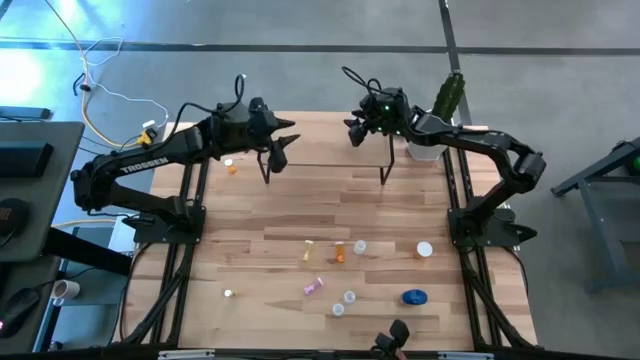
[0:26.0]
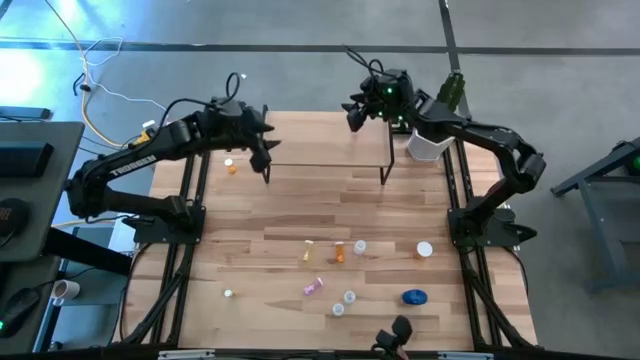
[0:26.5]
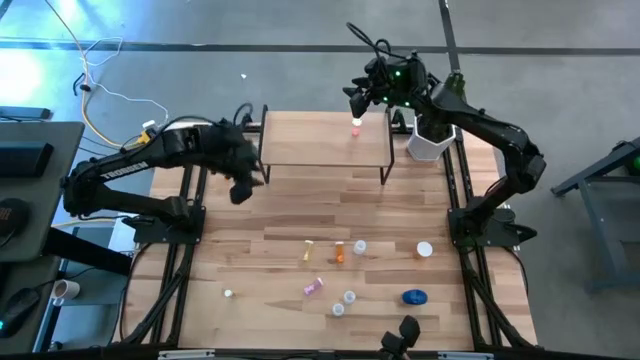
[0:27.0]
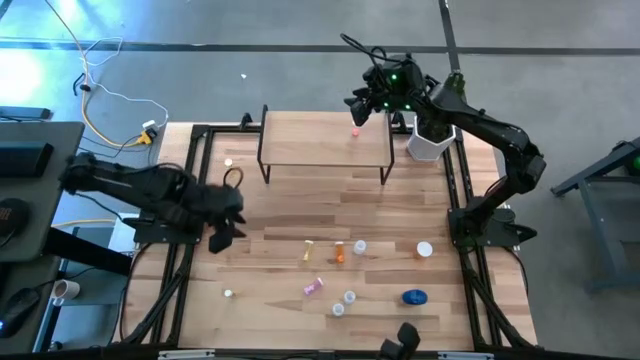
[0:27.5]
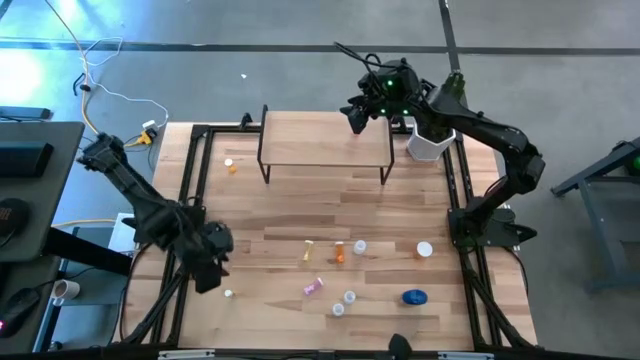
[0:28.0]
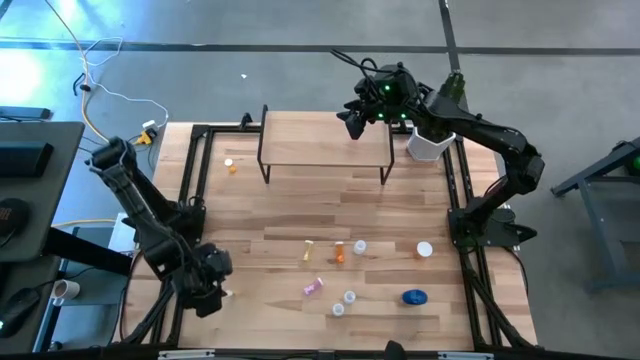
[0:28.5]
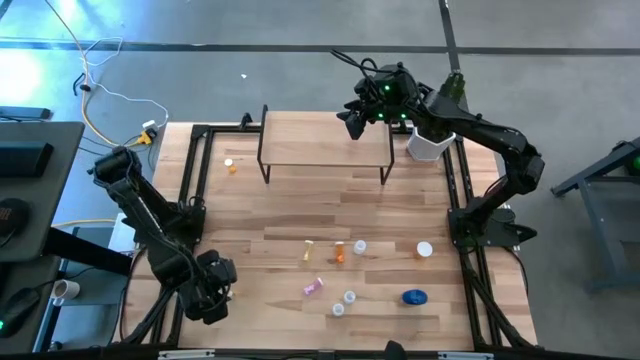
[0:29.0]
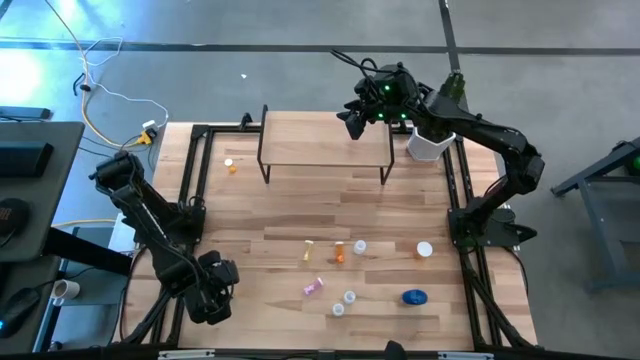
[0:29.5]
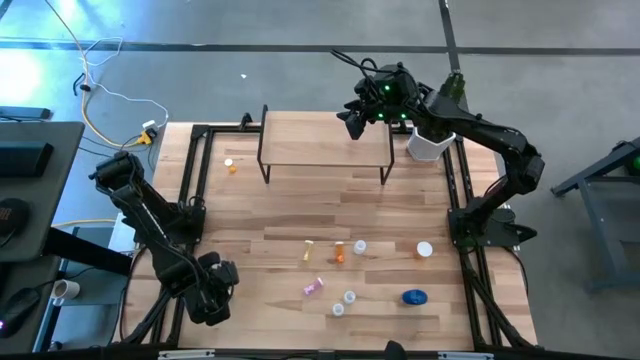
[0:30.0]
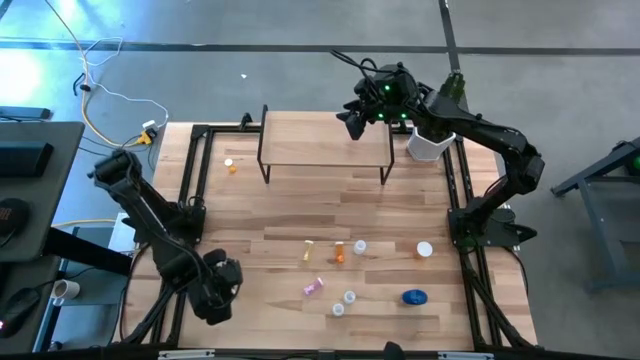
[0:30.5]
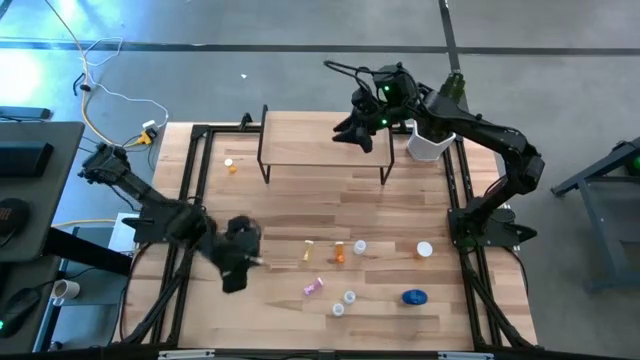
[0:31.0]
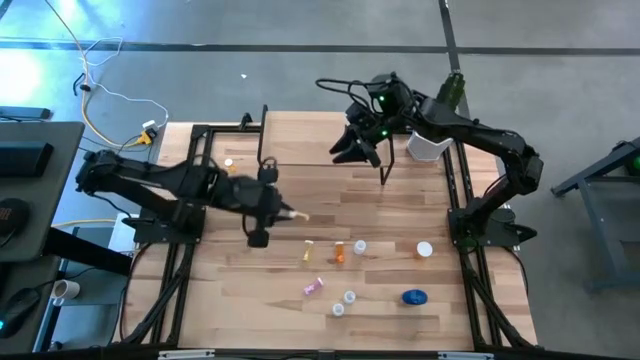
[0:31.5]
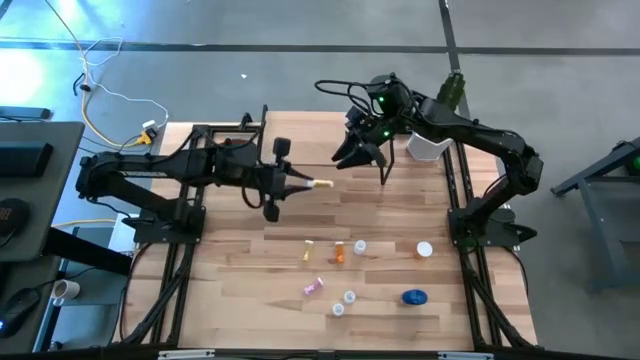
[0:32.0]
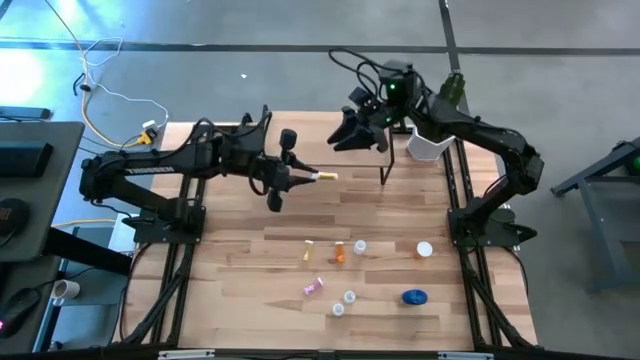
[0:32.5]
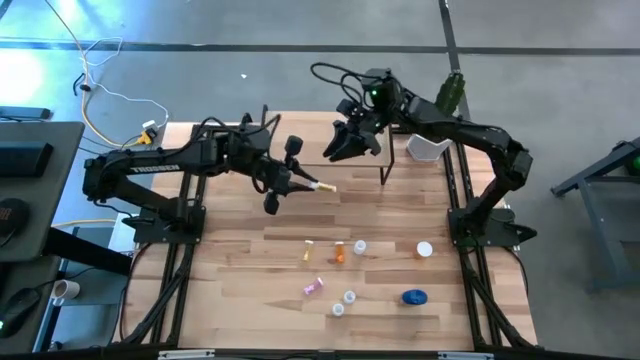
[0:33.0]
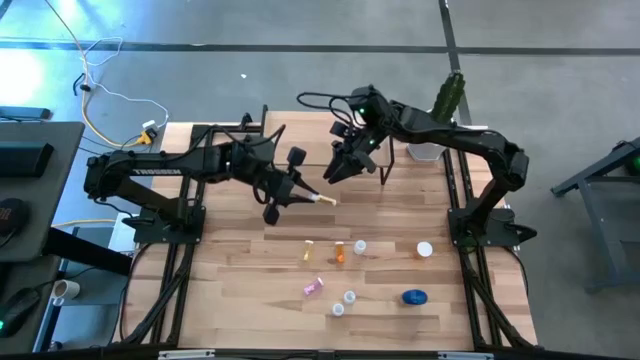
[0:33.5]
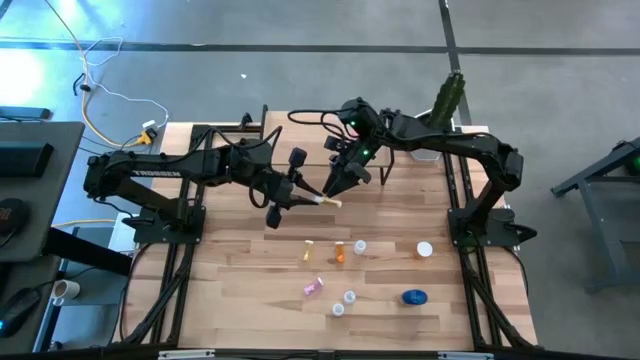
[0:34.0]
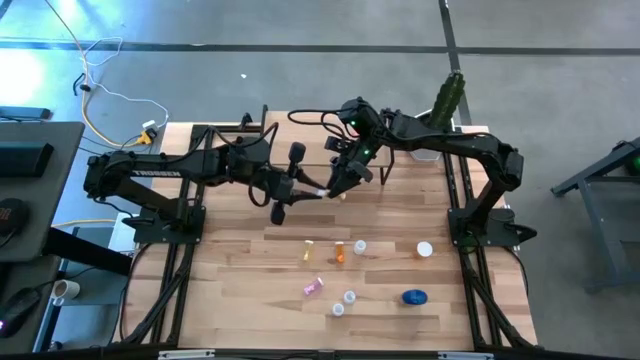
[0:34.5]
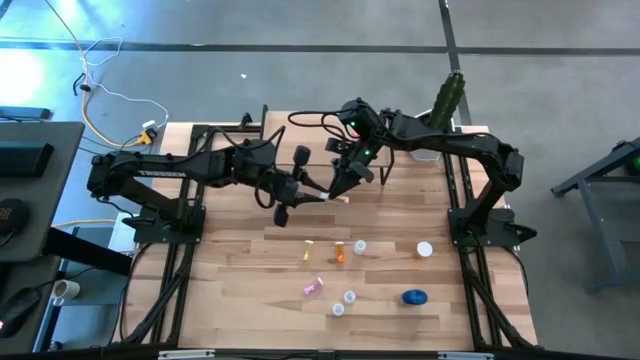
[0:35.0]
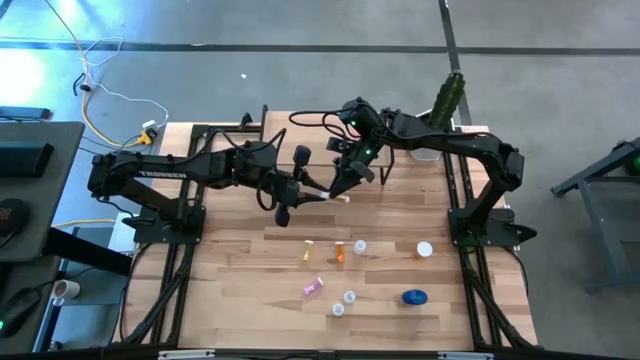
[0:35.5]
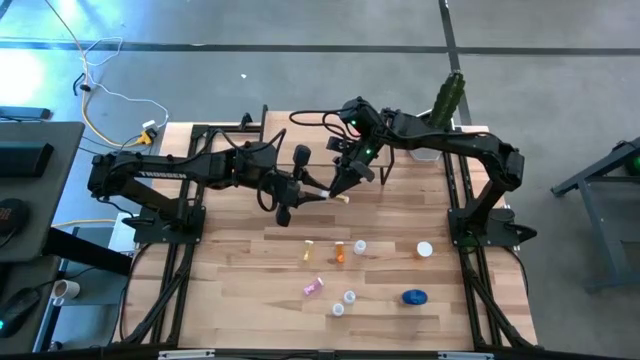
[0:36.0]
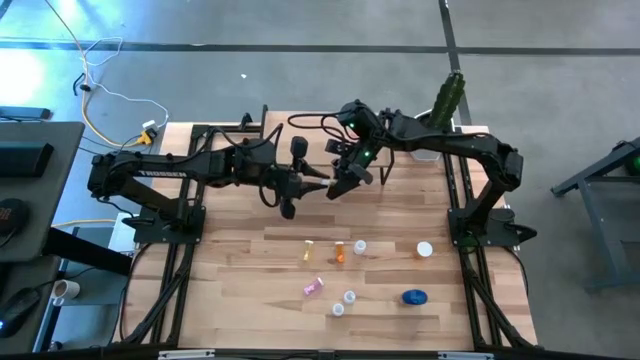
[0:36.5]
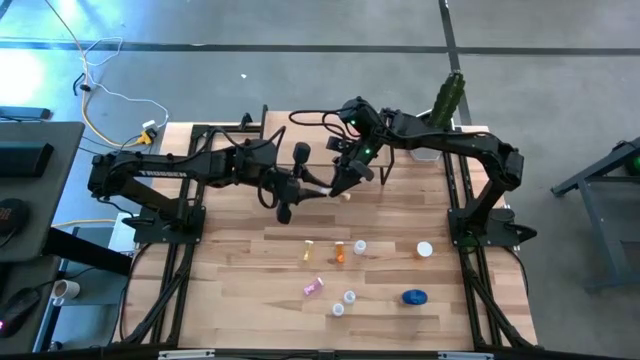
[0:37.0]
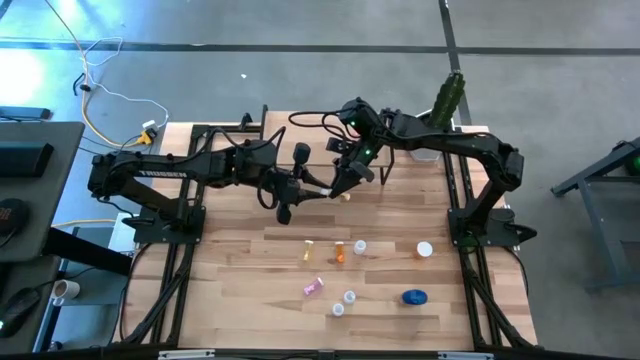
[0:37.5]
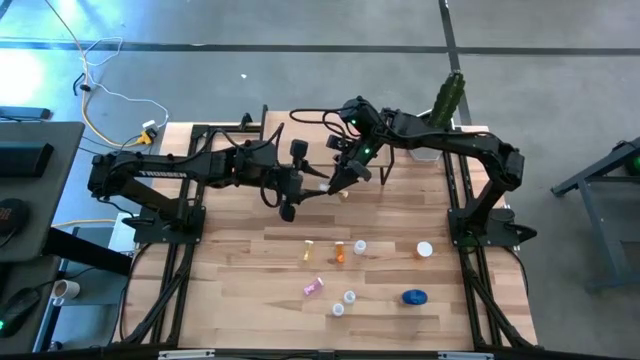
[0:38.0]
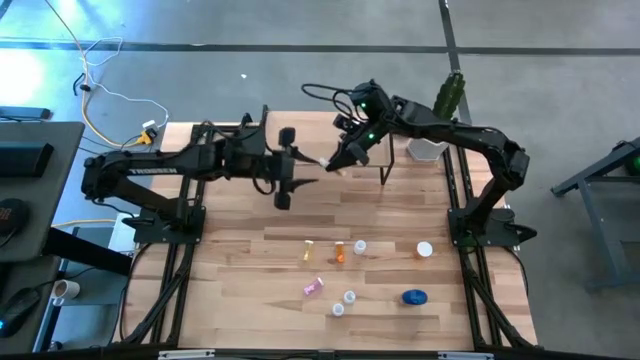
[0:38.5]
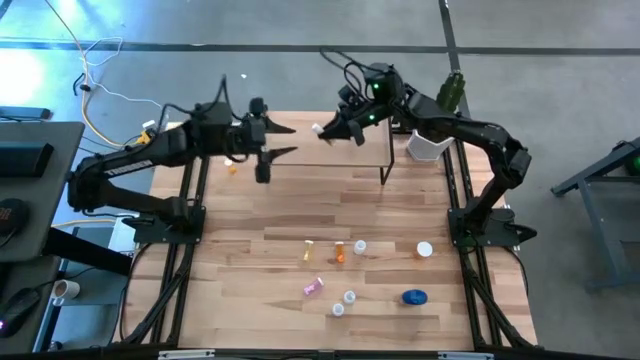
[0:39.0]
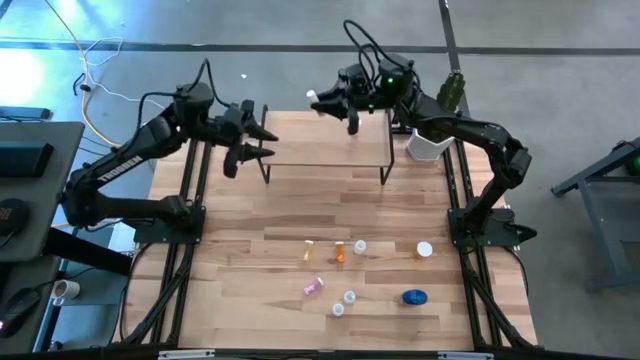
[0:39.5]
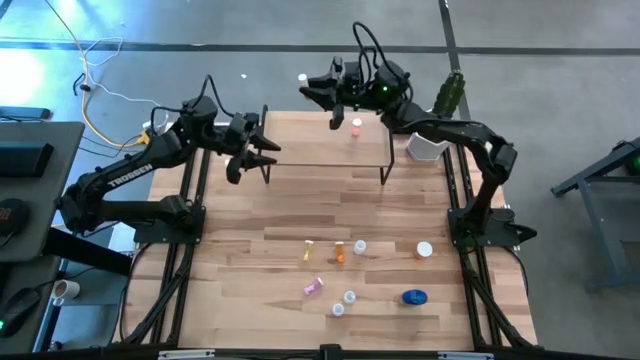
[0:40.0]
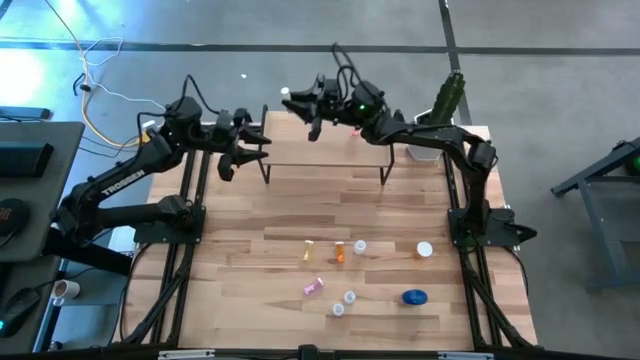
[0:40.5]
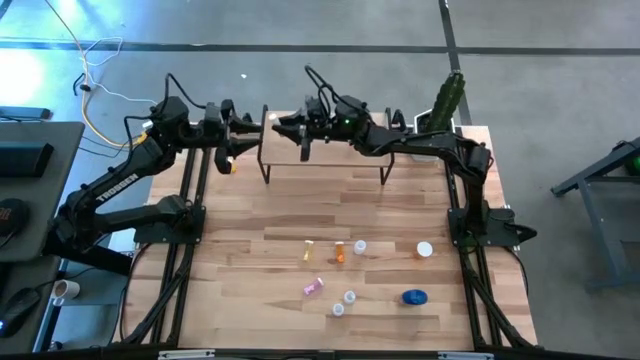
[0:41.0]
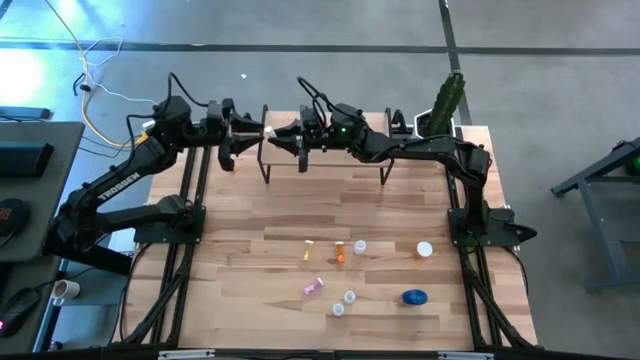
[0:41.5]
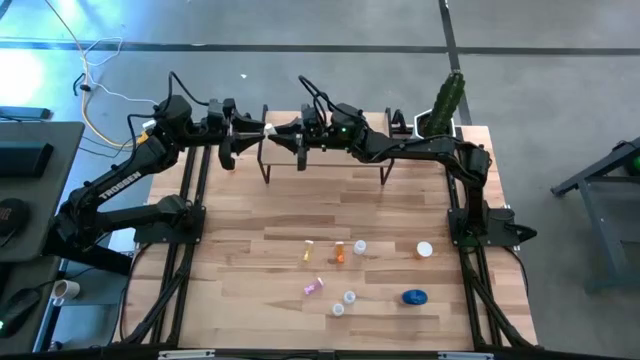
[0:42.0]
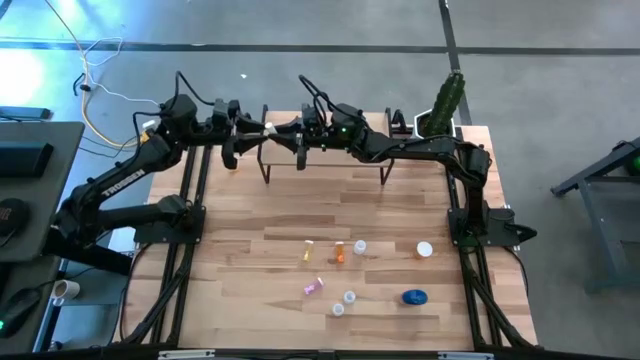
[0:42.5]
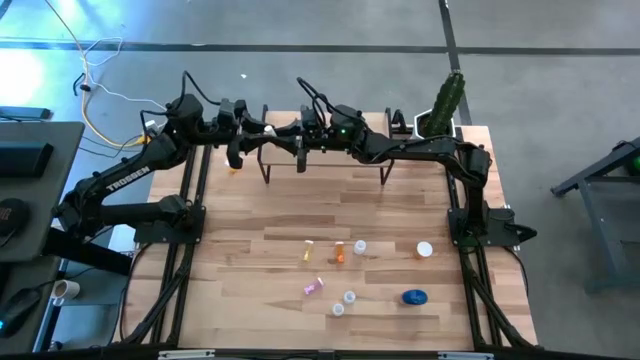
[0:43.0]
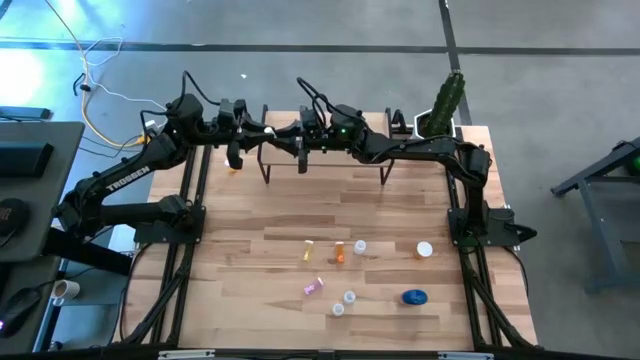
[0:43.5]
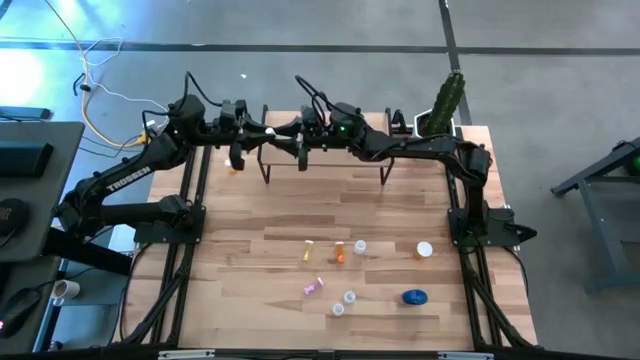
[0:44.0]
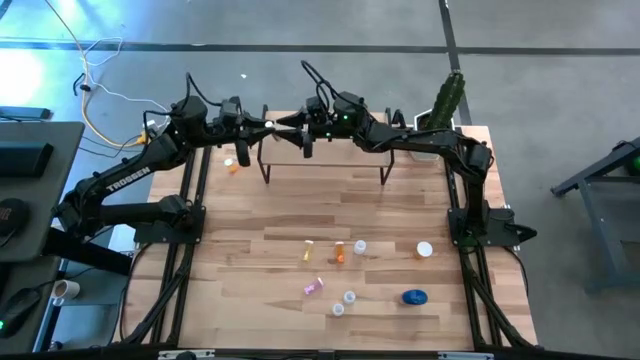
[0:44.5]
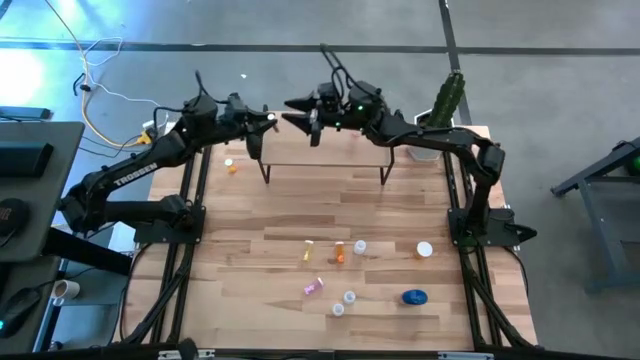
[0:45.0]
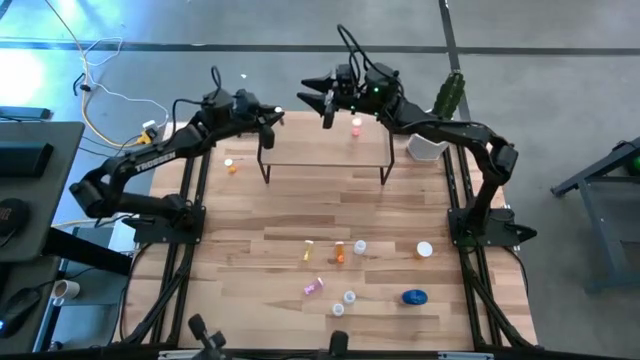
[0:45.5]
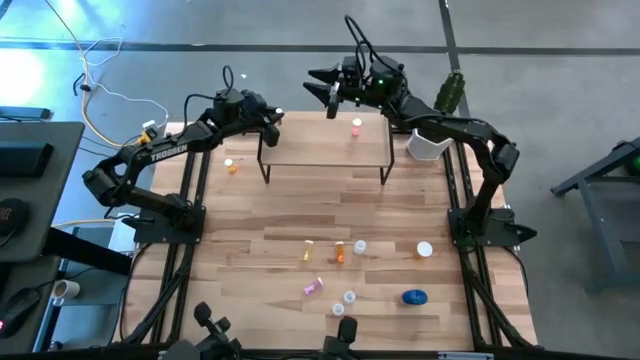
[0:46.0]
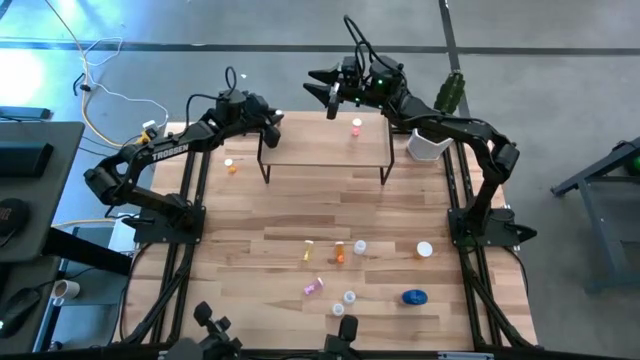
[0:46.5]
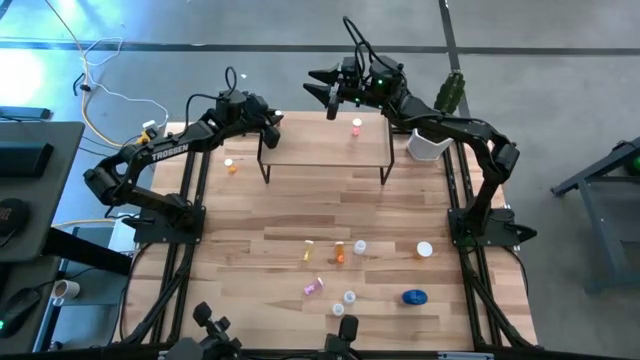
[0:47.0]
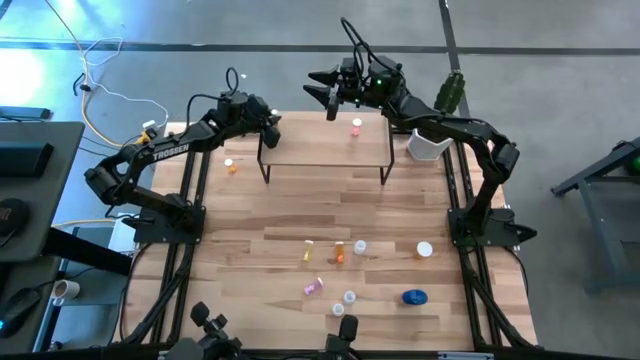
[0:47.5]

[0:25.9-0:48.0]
Task: Pick and place medicine bottles onto shelf by color
Put the bottom yellow medicine bottle on the shelf
